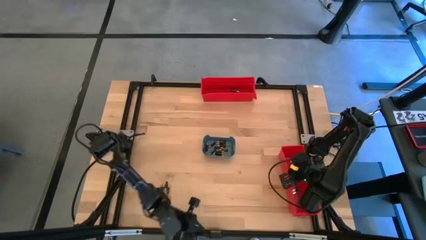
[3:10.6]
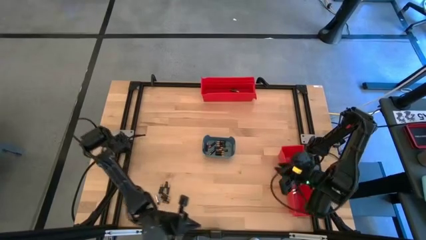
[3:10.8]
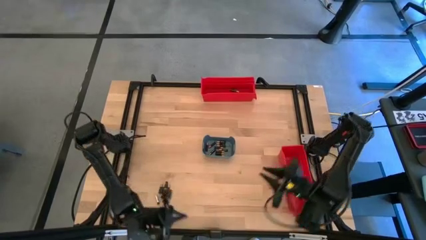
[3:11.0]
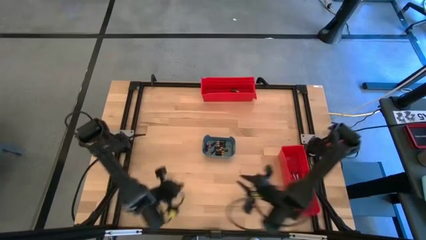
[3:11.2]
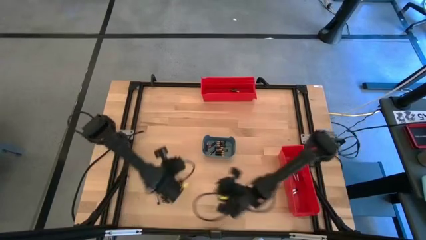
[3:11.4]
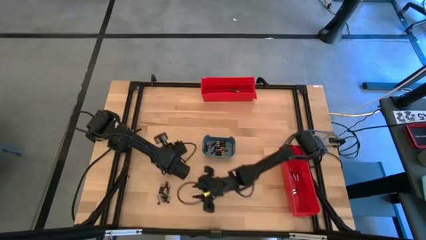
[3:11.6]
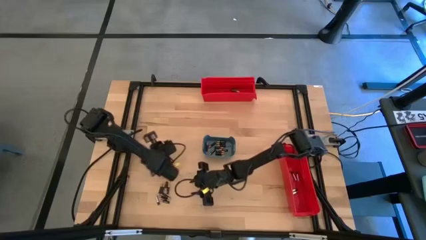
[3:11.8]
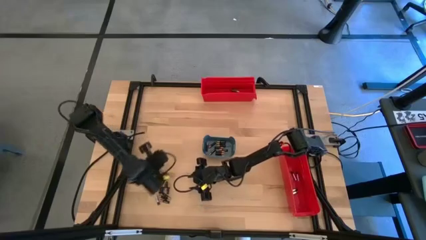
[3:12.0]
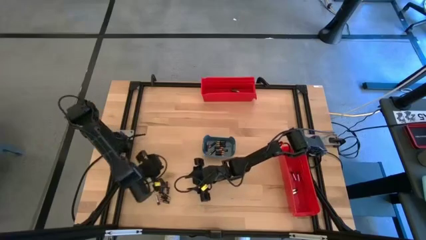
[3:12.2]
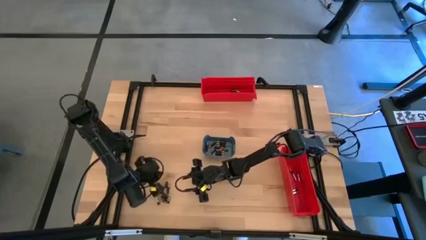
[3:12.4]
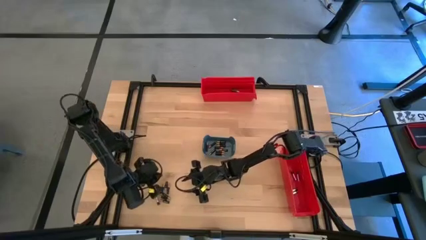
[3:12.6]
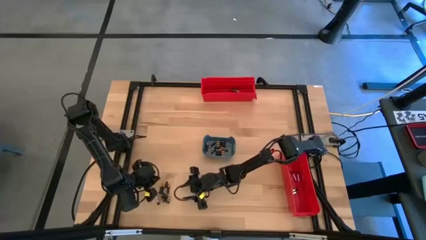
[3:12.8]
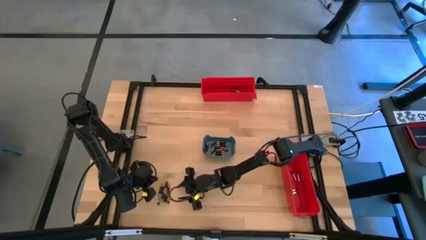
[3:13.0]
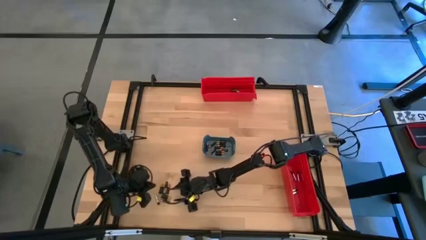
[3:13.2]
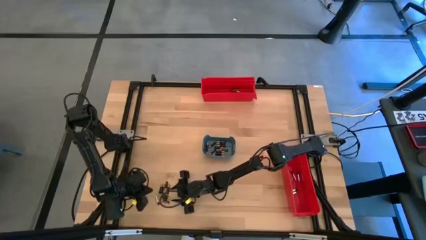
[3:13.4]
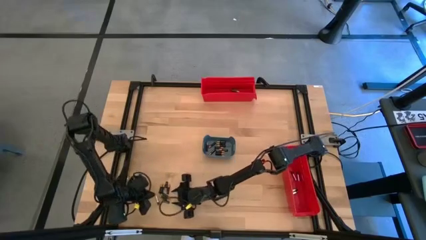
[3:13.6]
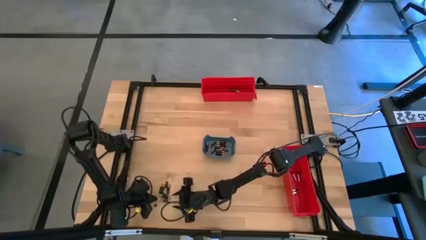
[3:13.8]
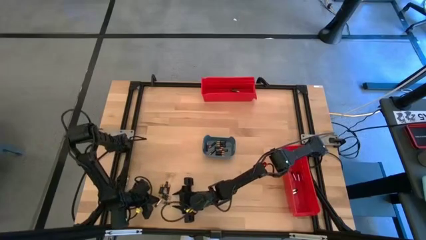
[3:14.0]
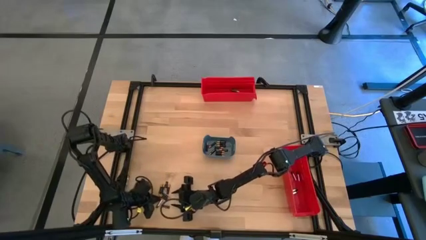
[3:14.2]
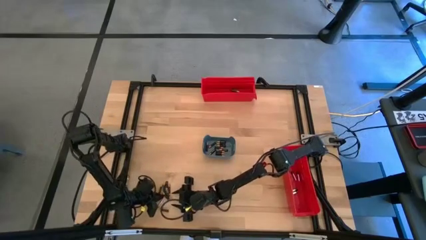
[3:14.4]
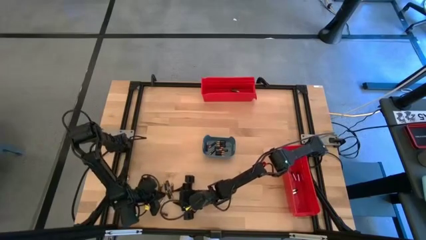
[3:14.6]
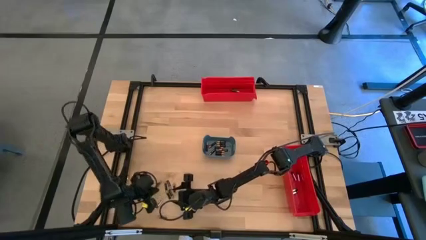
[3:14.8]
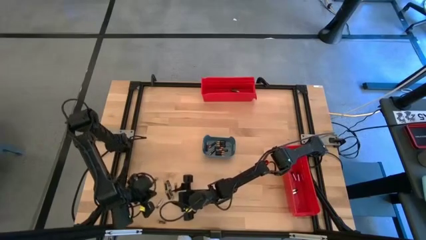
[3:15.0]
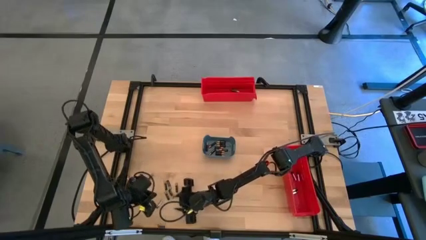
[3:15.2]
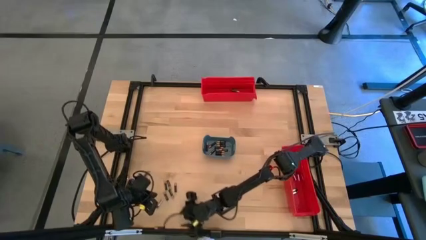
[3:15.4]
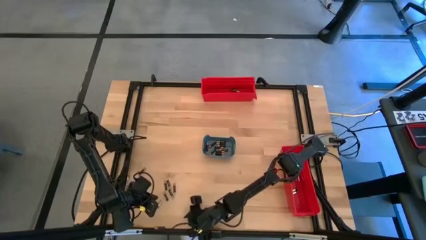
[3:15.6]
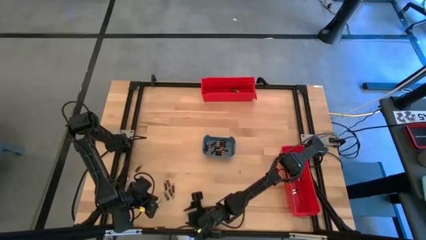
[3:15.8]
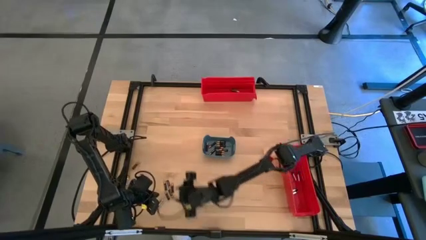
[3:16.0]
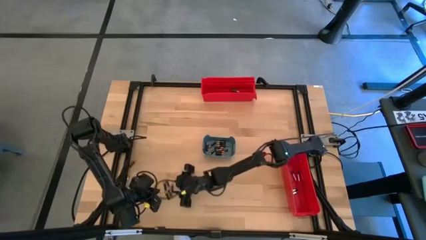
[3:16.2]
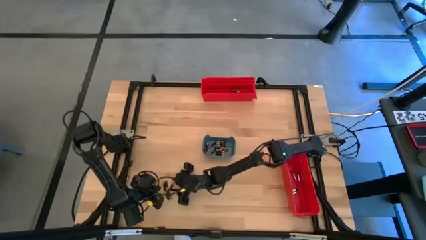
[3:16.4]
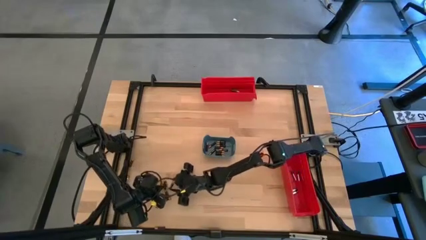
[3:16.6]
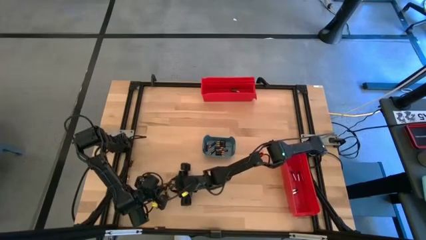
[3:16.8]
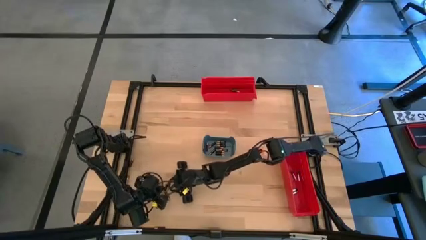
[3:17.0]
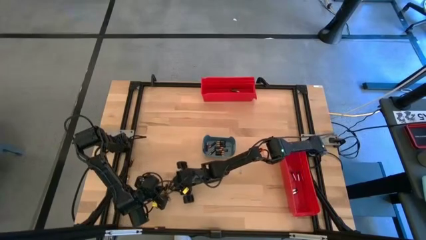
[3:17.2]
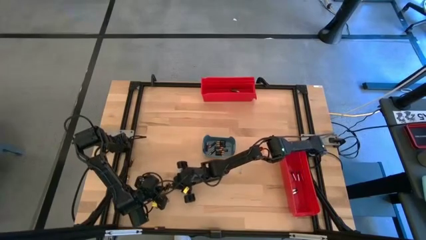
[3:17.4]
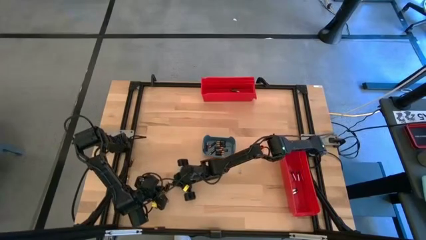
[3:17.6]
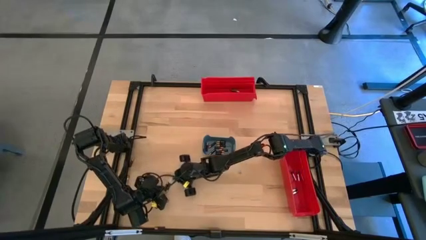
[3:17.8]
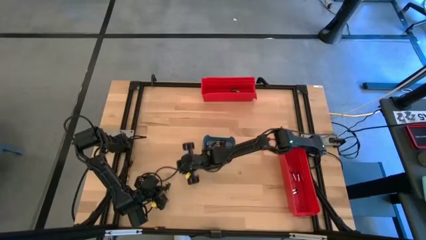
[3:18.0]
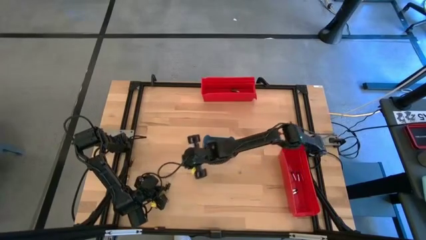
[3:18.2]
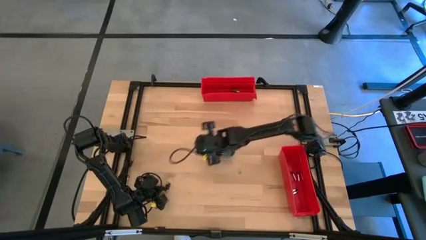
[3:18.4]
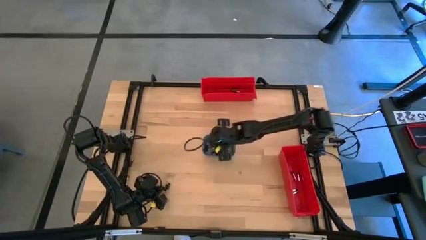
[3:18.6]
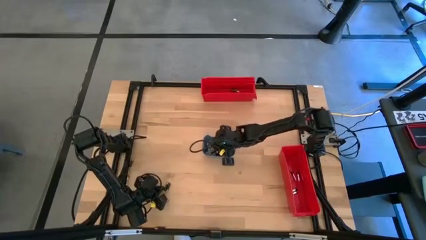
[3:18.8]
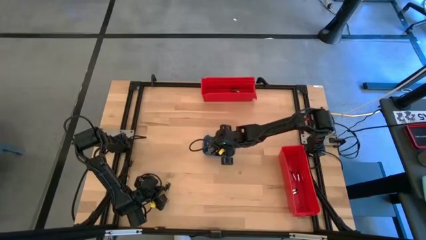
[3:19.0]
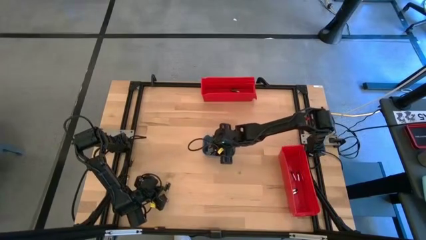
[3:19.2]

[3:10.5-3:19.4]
Task: Sort batteries
Put the black battery into the blue bin

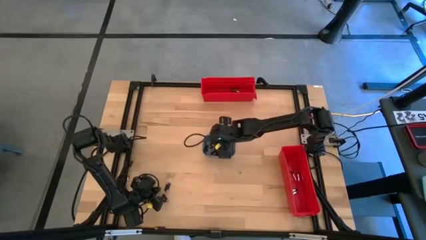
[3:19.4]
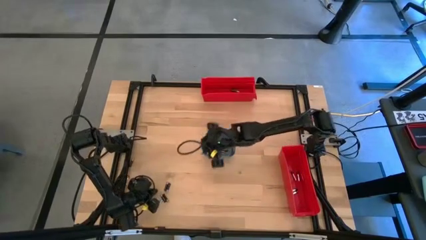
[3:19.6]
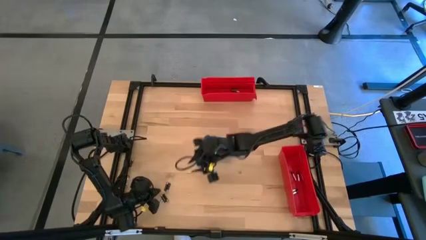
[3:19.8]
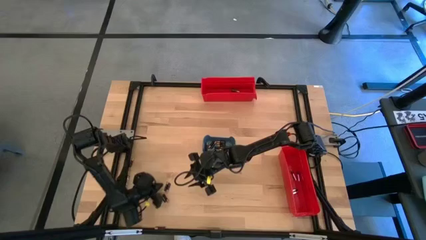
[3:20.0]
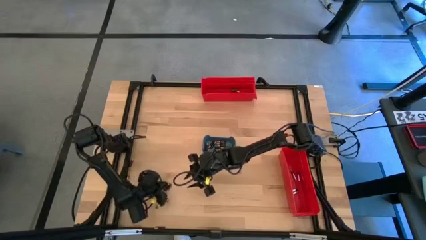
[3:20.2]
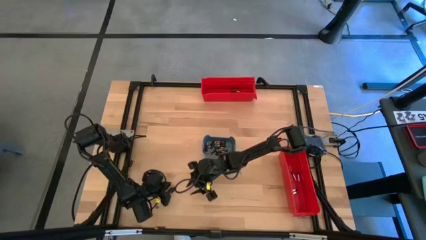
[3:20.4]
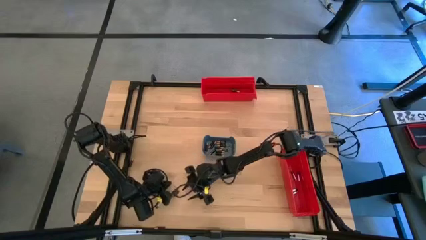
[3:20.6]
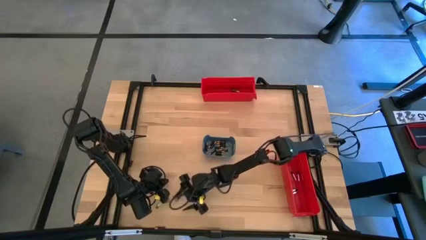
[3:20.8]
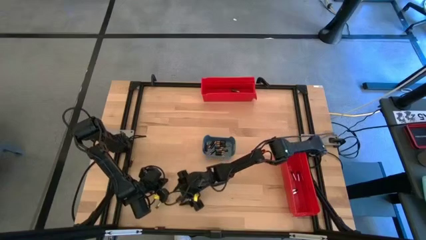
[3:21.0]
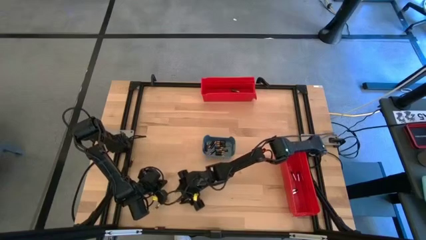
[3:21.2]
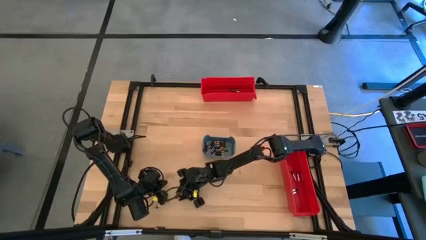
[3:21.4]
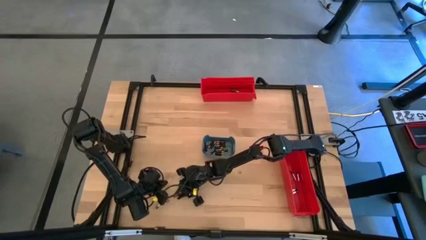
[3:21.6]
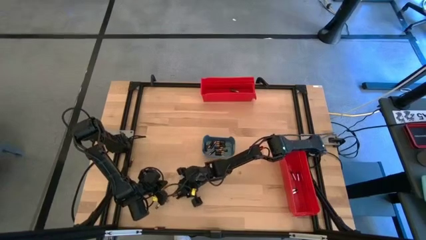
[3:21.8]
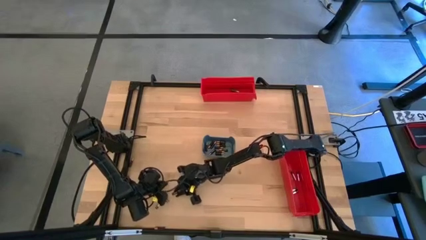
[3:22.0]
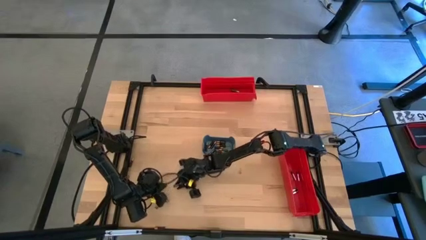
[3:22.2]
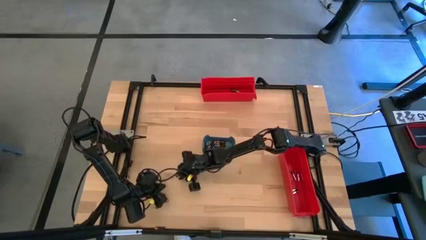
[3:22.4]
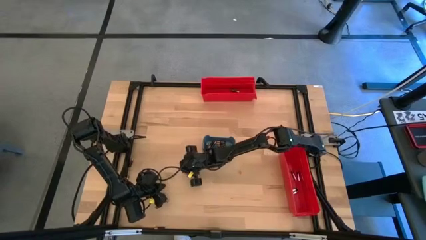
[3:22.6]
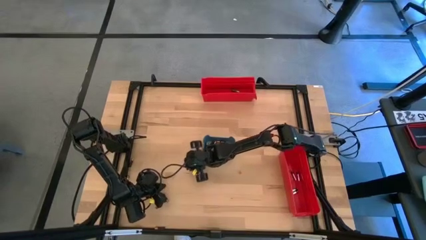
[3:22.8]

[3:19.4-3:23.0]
Put the black battery into the blue bin

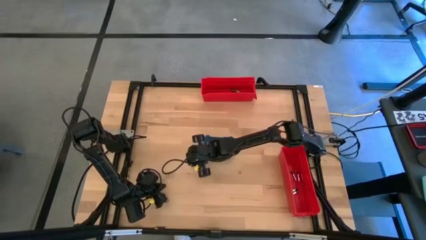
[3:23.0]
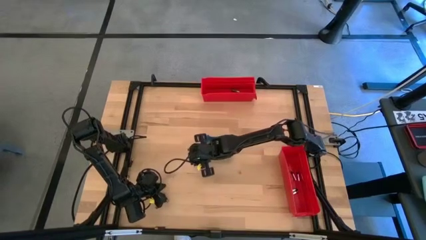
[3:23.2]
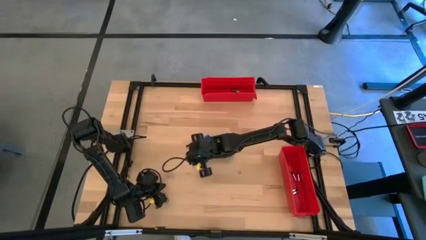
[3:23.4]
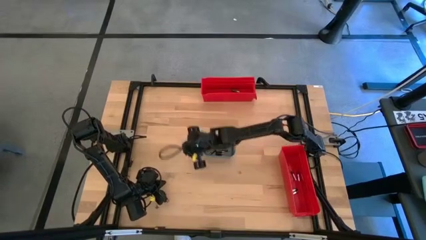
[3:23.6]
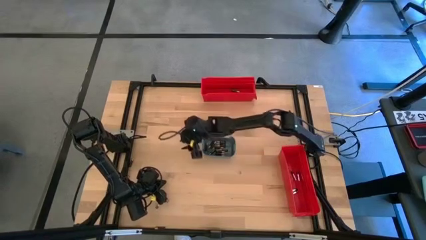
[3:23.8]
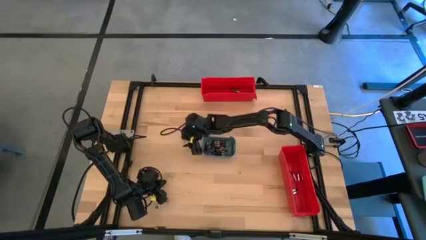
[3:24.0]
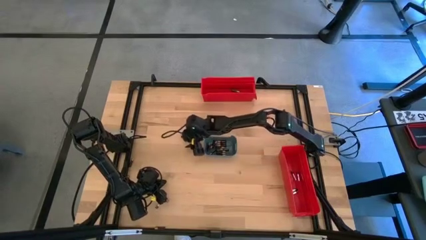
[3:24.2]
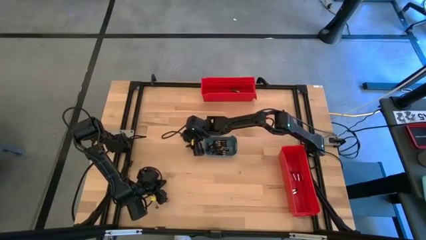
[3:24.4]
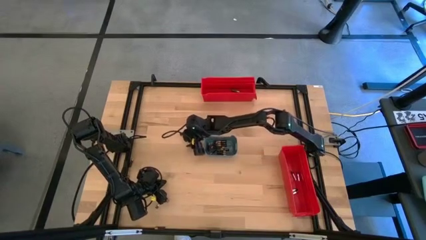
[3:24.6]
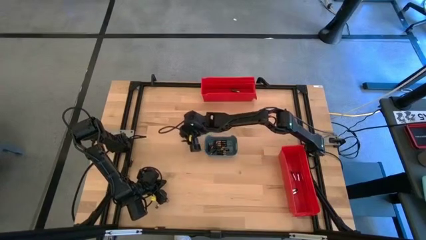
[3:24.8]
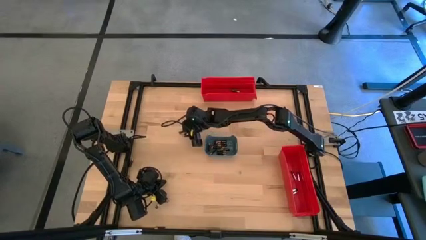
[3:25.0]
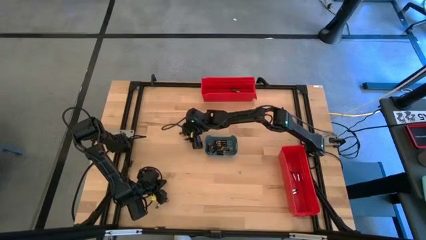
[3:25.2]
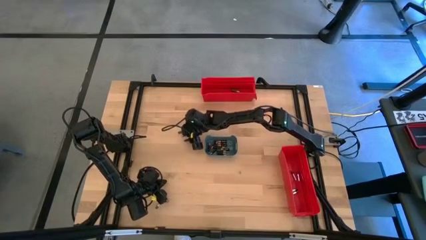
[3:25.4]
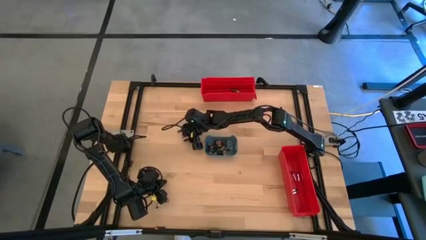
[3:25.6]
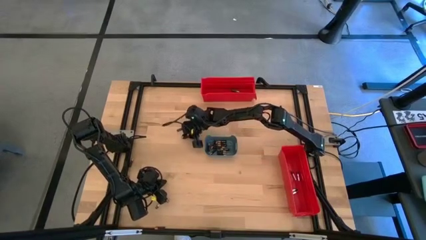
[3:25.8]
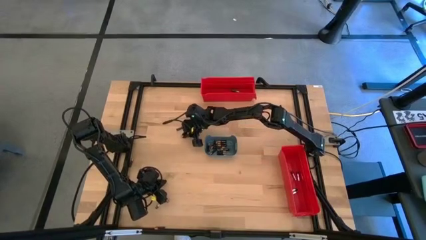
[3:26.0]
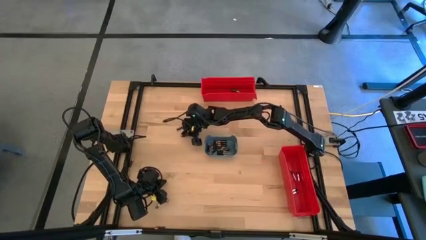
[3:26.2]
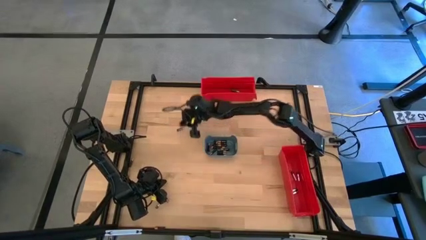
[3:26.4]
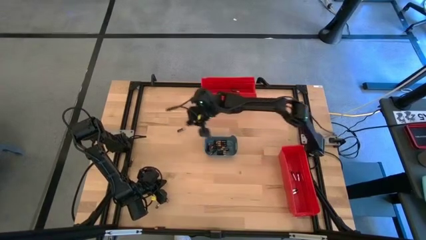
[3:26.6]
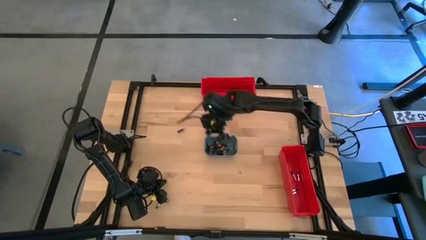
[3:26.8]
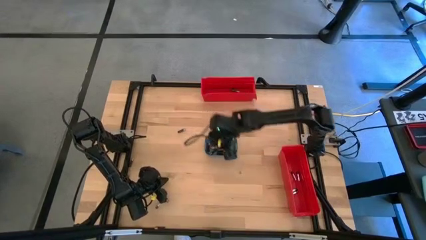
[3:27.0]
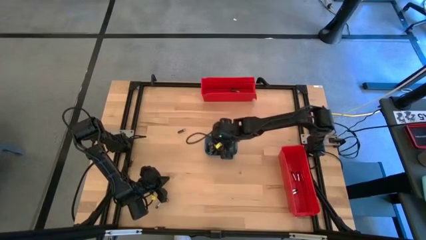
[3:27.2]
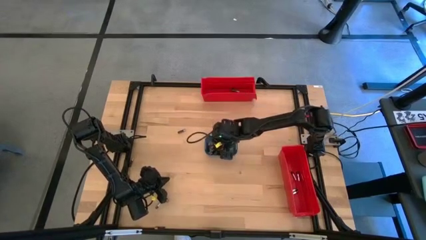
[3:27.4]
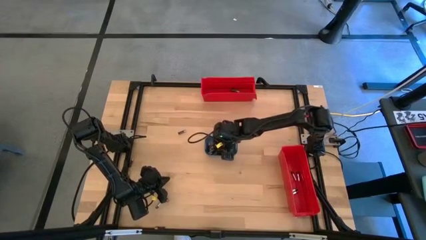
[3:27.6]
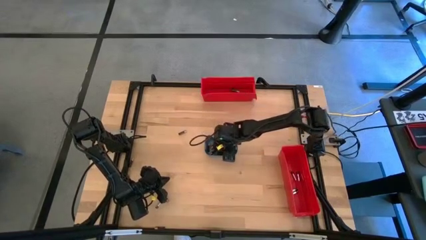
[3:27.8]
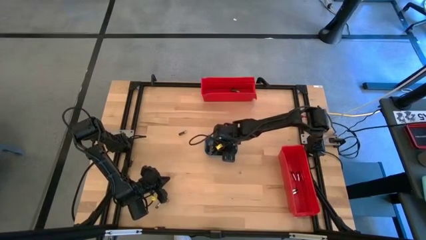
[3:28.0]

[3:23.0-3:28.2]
Put the black battery into the blue bin
